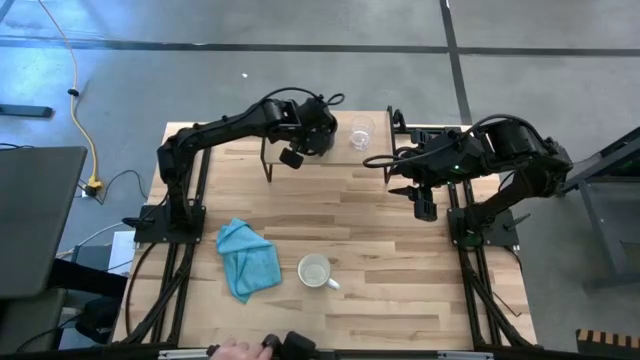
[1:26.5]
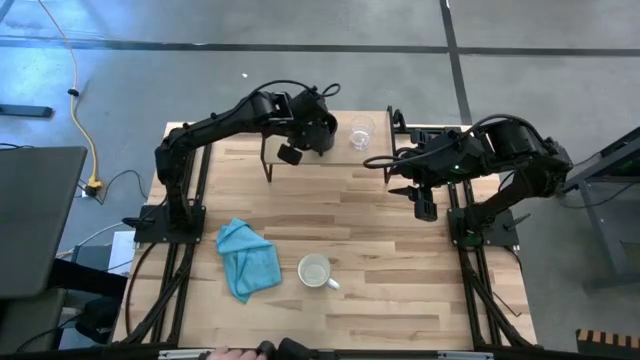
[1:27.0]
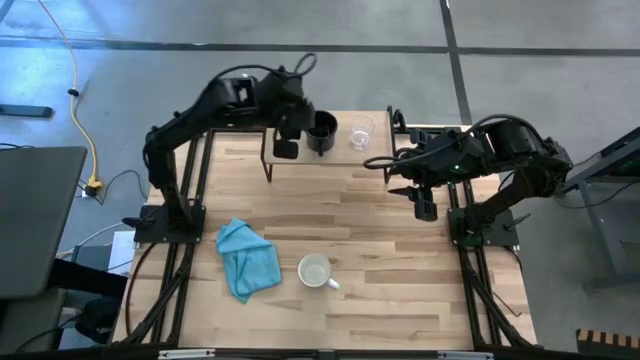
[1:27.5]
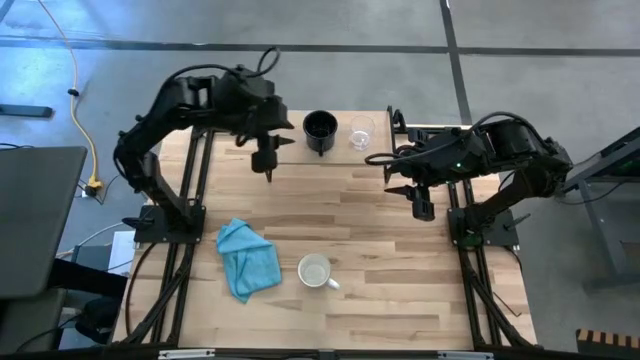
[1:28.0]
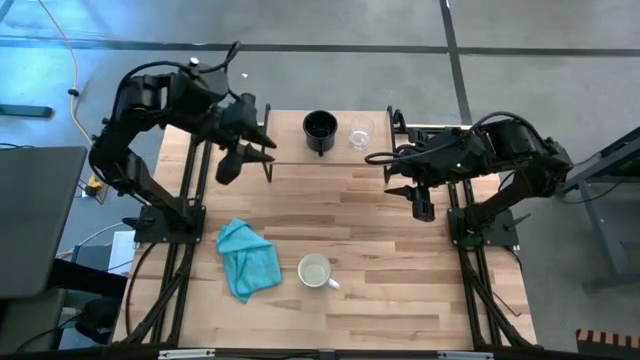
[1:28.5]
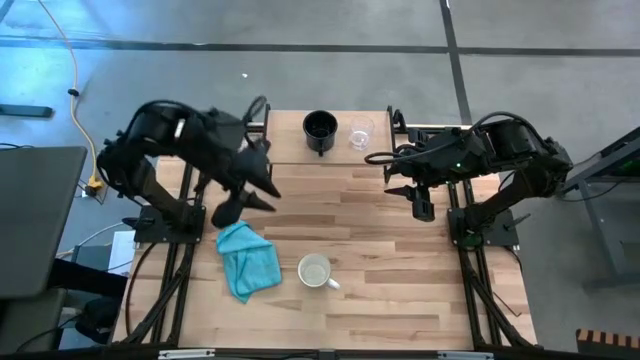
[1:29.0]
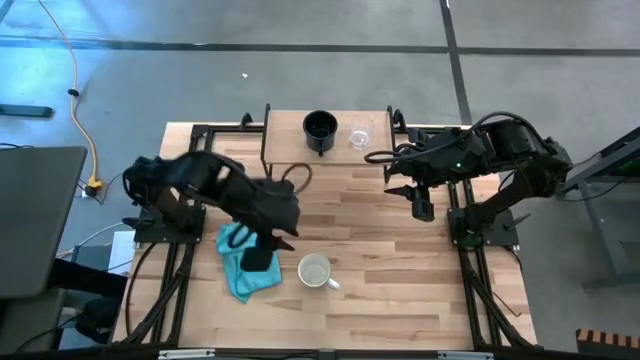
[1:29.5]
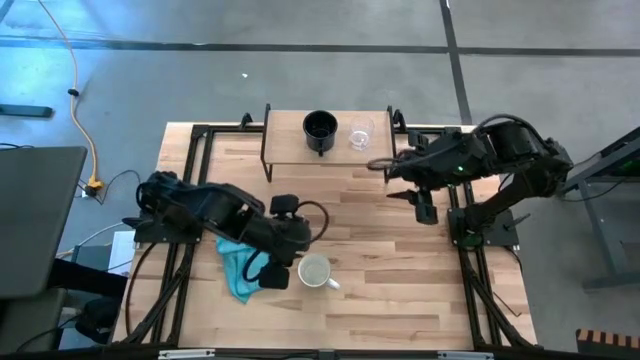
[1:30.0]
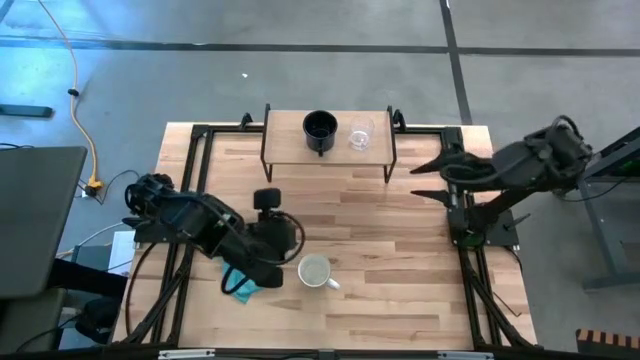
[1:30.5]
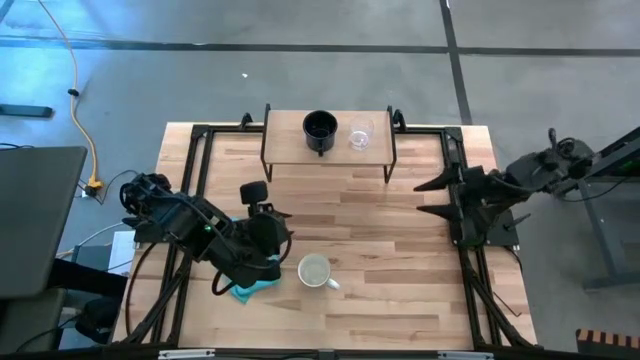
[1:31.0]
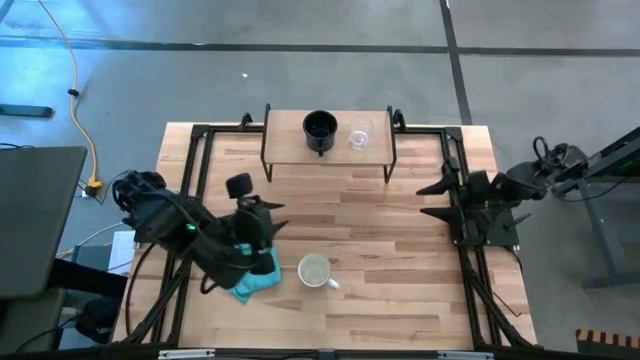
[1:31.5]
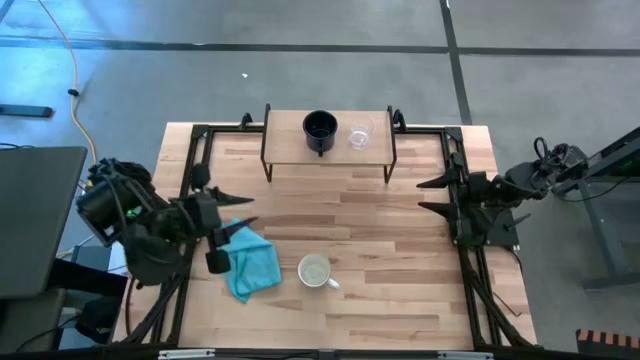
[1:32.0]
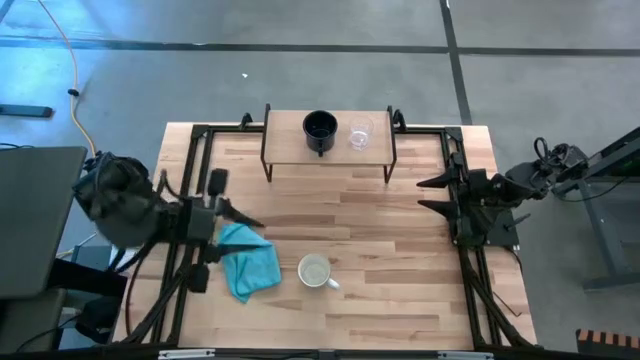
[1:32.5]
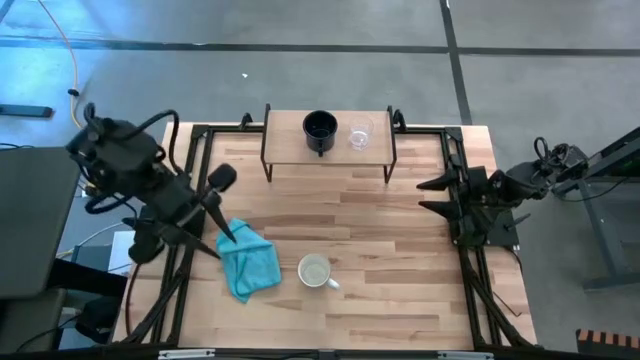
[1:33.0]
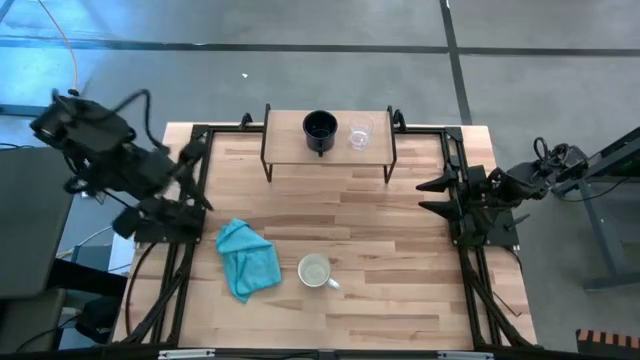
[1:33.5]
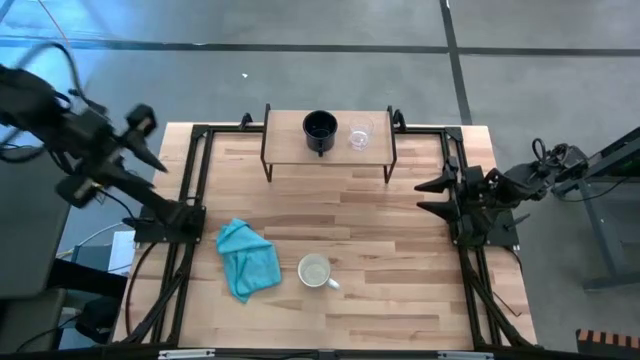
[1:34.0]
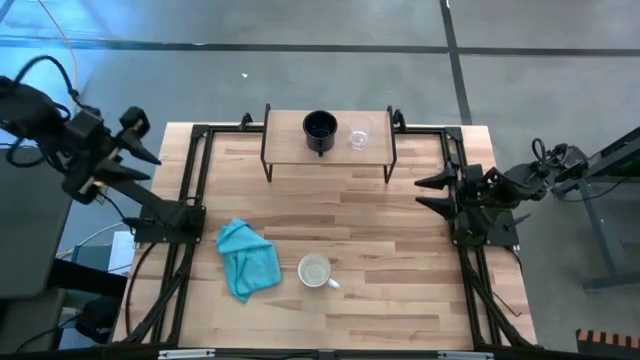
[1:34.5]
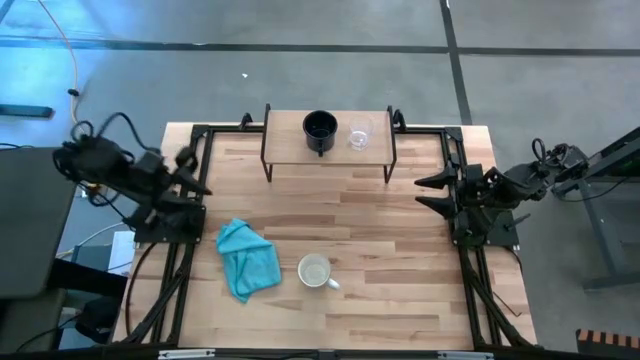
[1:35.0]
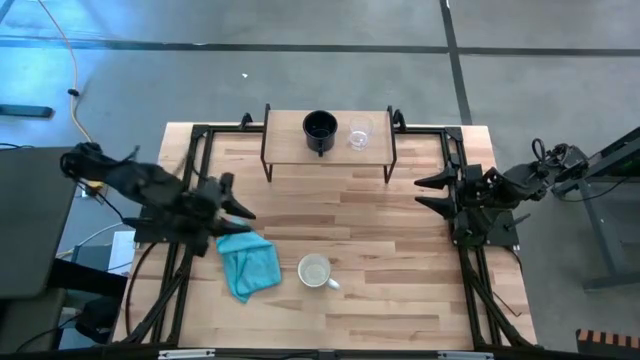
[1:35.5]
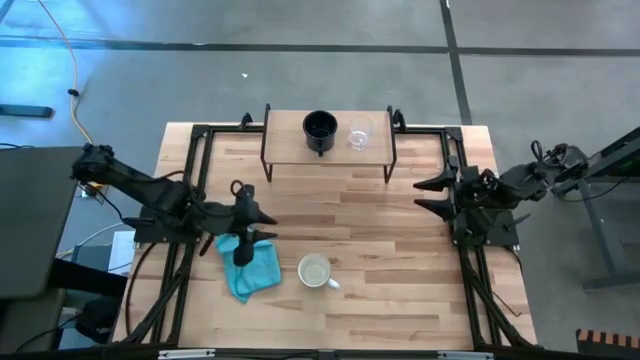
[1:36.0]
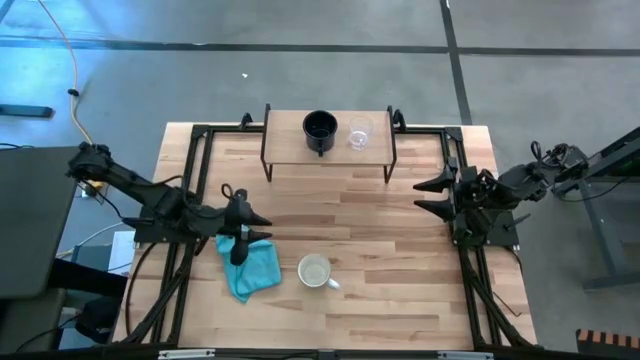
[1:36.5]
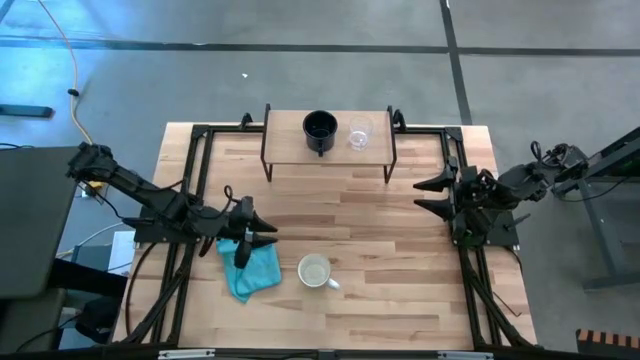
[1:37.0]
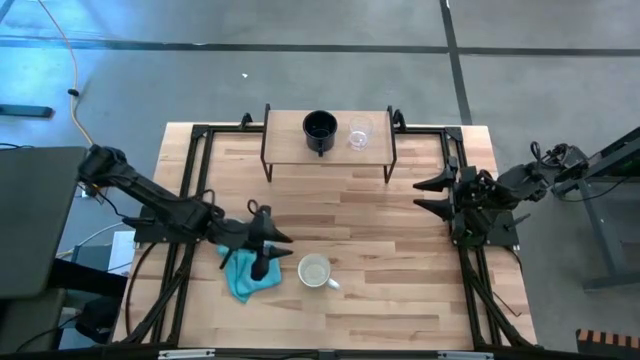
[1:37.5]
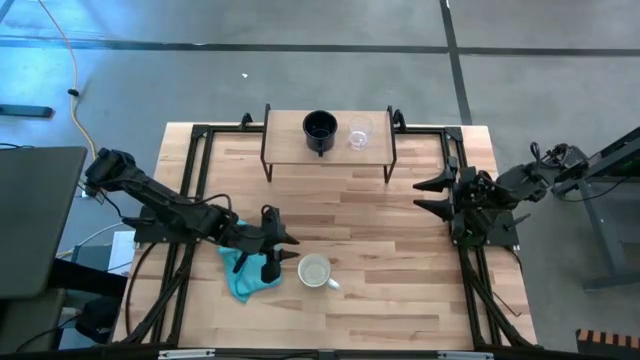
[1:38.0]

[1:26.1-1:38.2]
Task: Stack small to large cups/mugs on shelf
Put the blue mug on the shelf

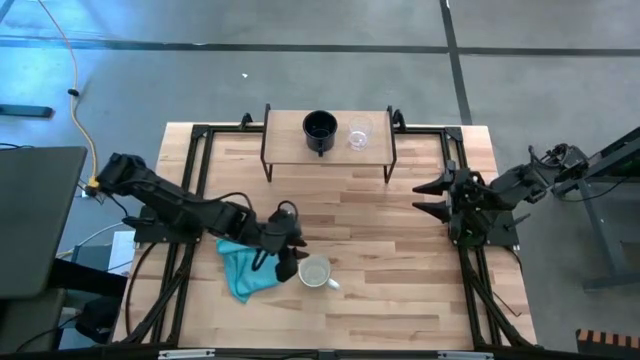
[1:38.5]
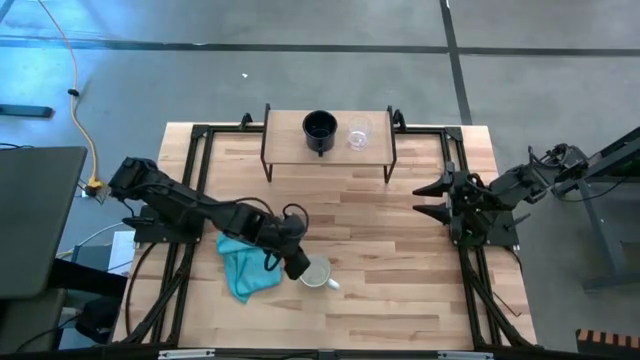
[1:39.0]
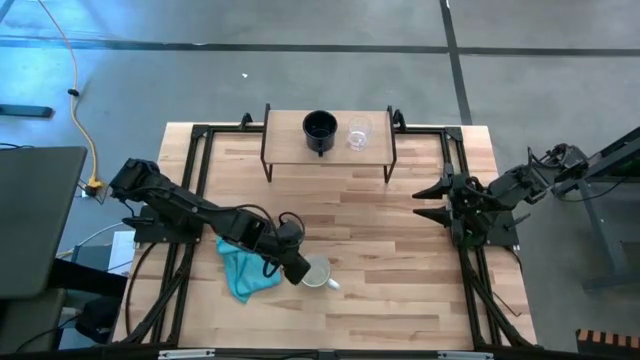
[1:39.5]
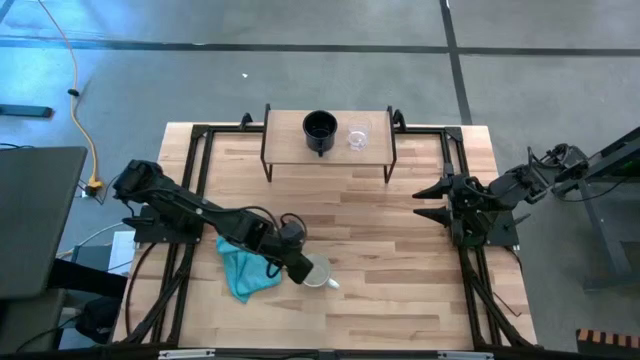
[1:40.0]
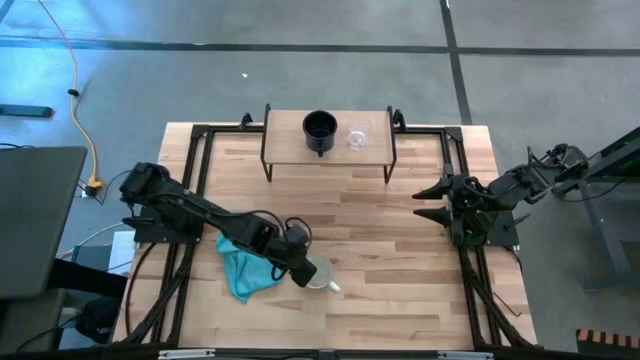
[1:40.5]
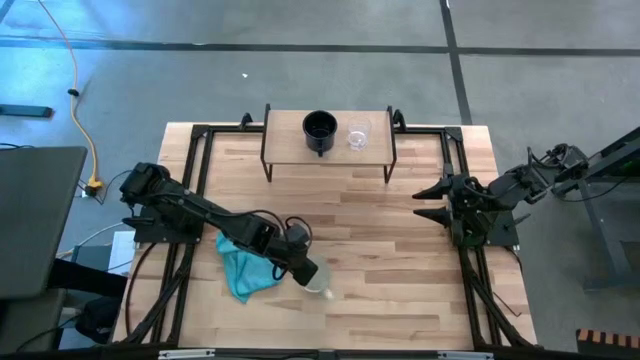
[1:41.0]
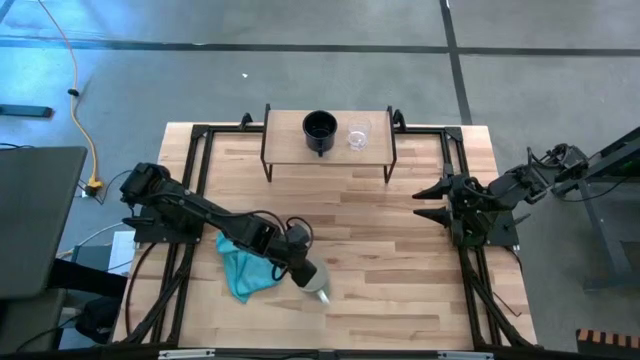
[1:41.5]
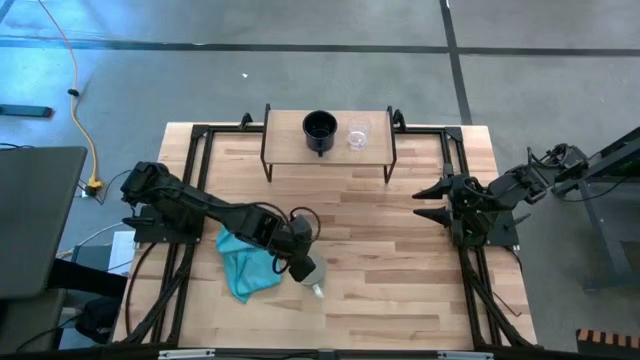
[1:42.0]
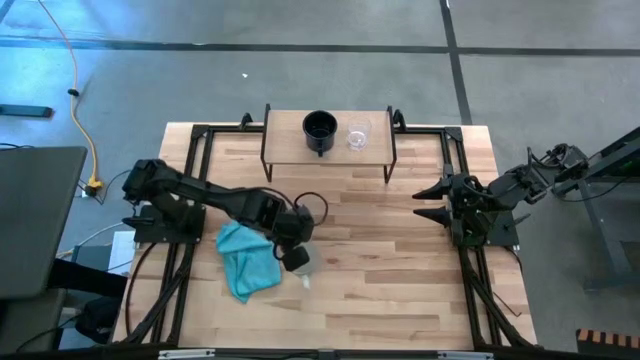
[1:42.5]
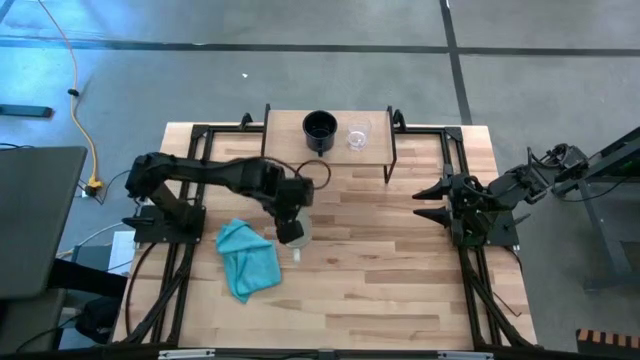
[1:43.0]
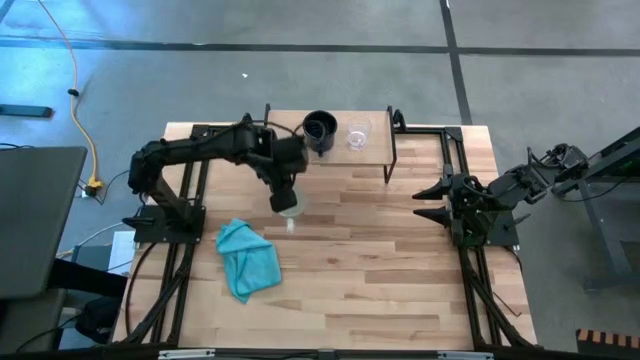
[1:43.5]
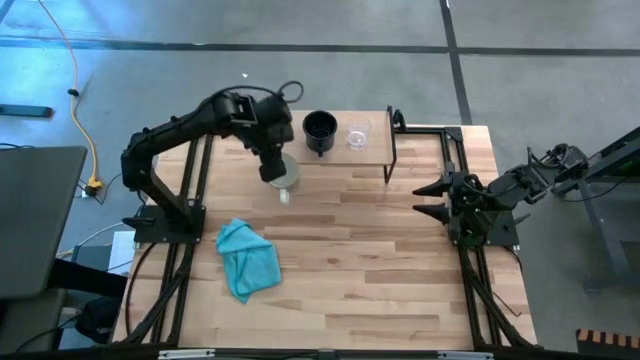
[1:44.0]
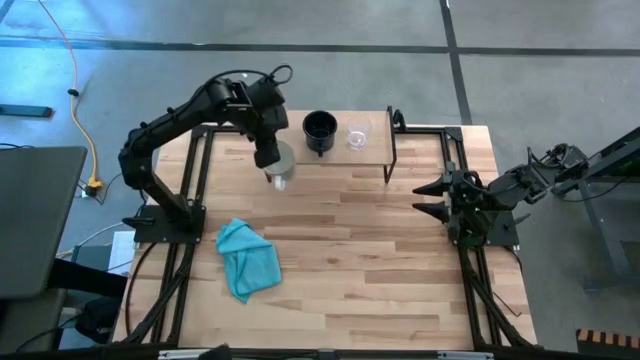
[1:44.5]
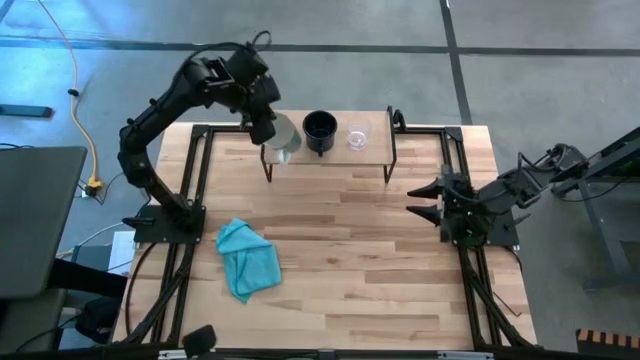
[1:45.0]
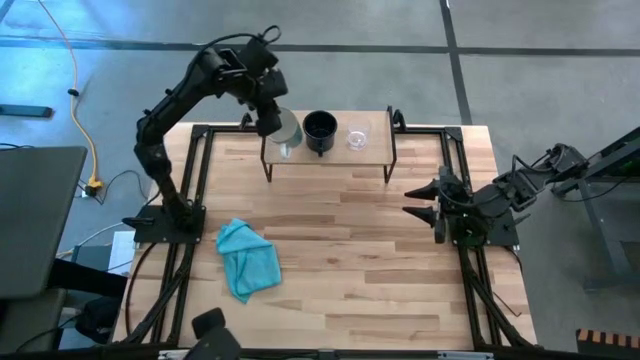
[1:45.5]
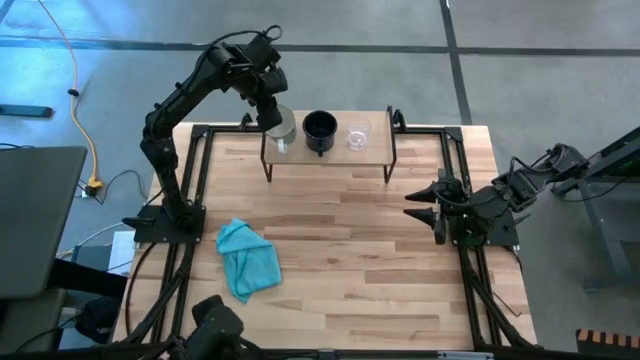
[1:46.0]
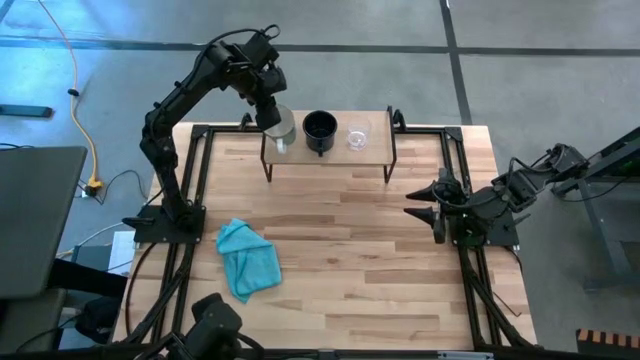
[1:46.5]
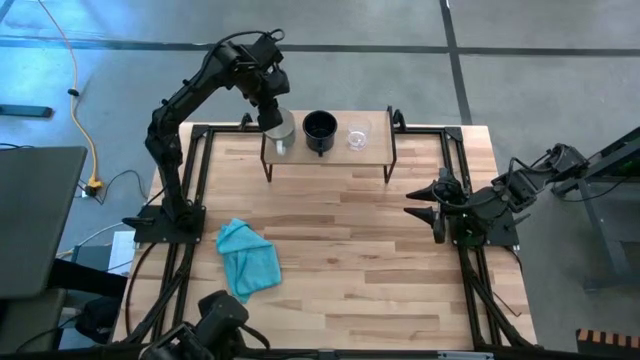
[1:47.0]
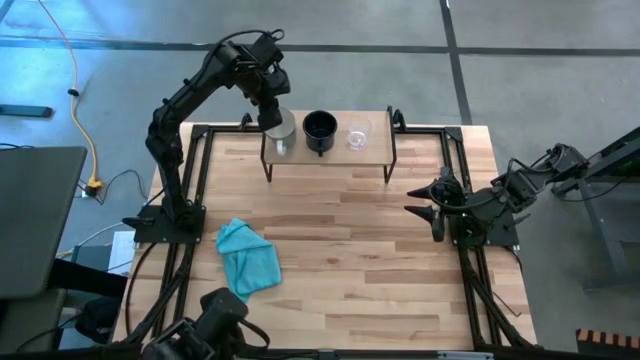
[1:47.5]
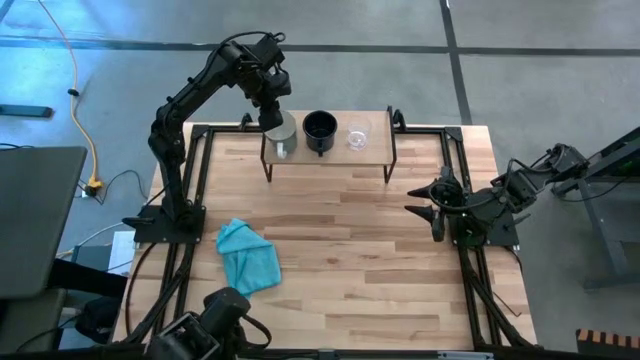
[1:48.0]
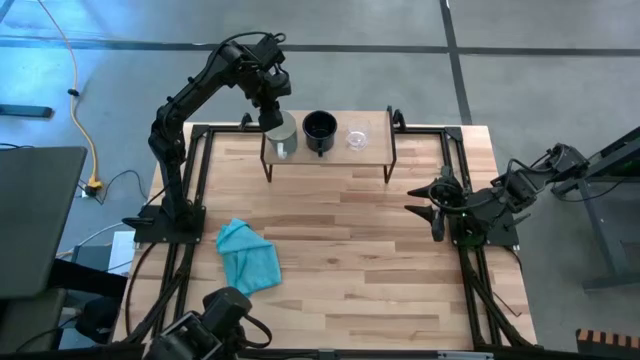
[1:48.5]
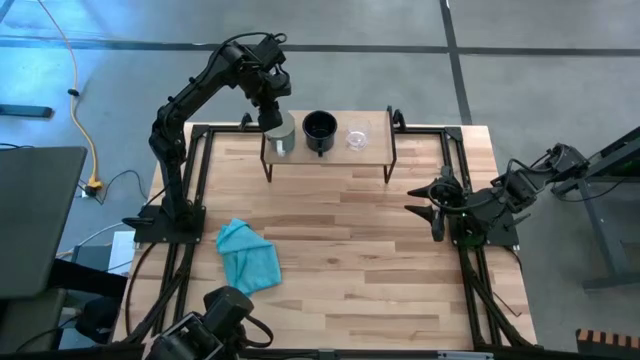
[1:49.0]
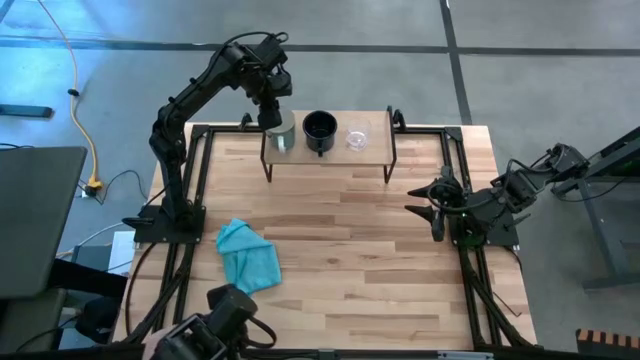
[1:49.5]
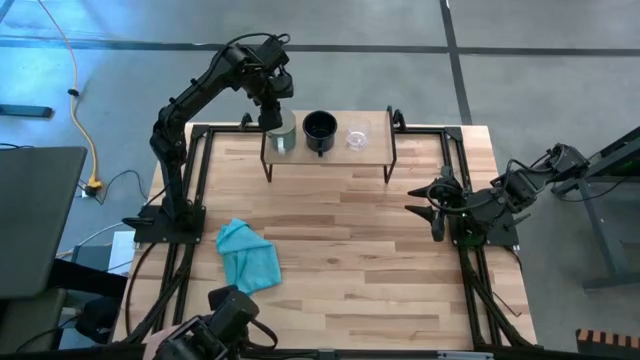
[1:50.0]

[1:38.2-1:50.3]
Put the blue mug on the shelf
